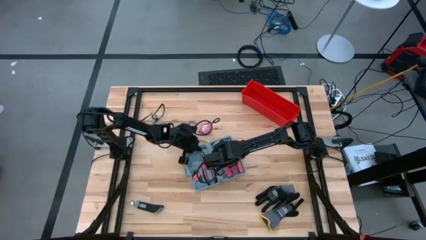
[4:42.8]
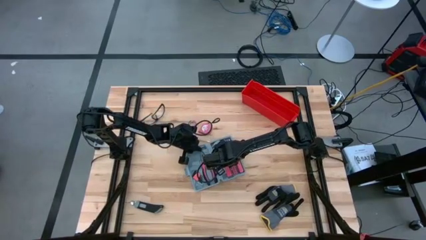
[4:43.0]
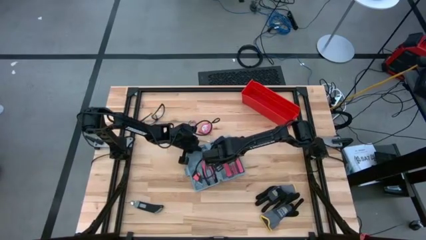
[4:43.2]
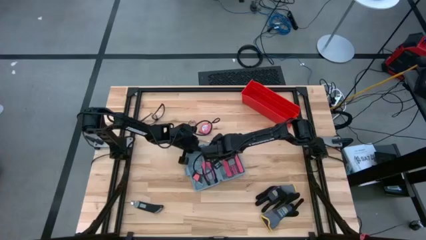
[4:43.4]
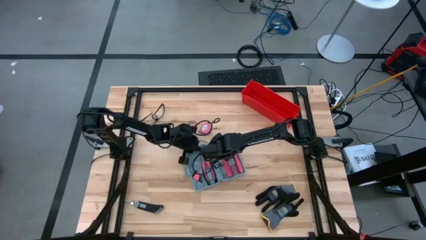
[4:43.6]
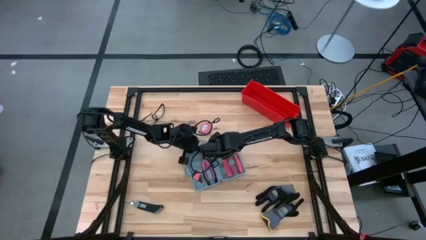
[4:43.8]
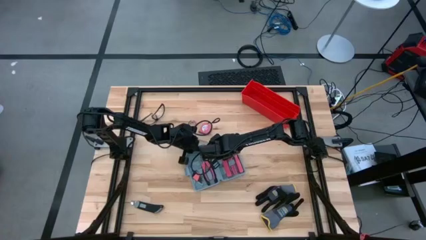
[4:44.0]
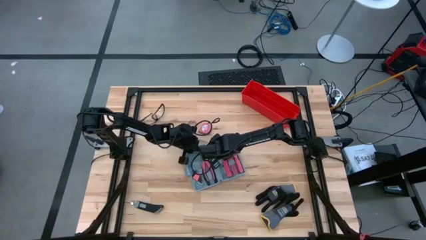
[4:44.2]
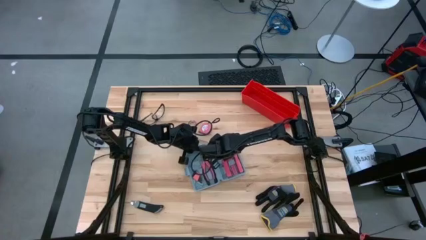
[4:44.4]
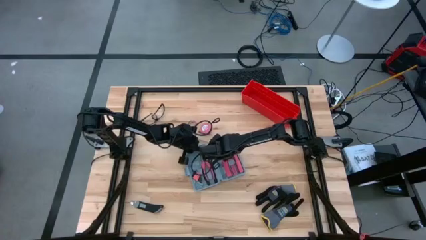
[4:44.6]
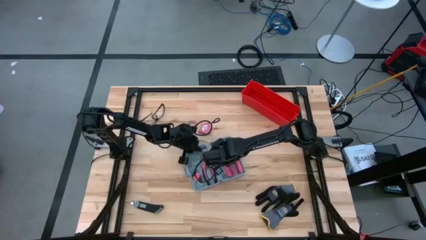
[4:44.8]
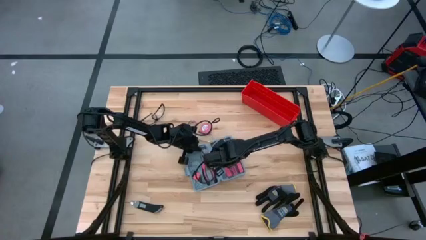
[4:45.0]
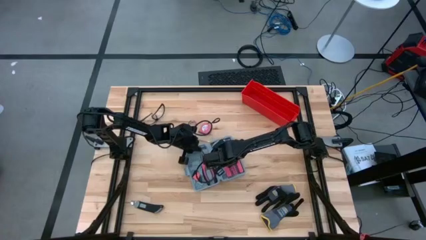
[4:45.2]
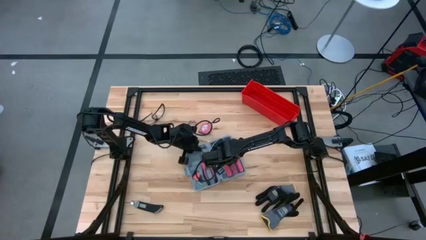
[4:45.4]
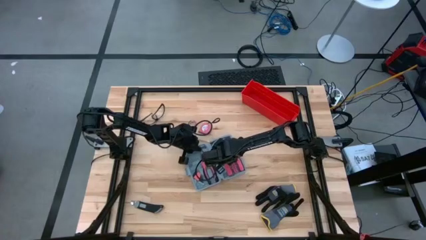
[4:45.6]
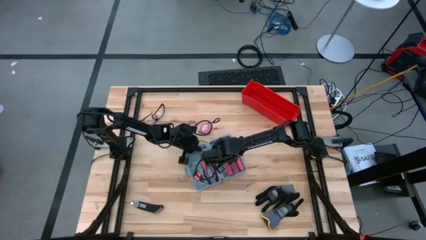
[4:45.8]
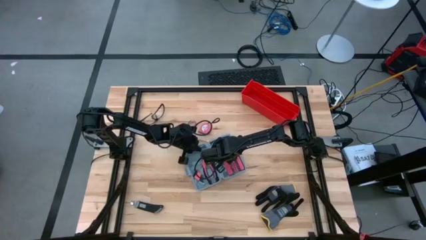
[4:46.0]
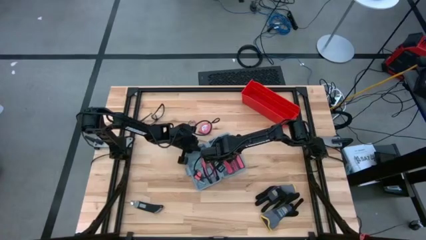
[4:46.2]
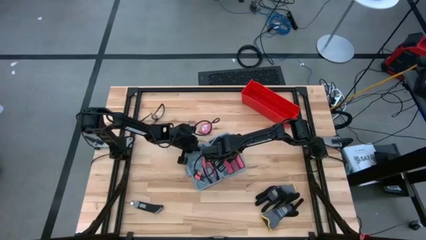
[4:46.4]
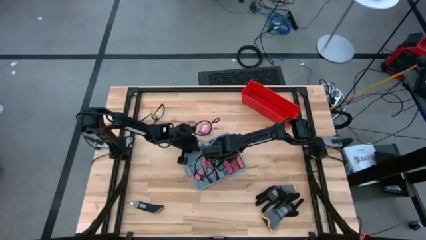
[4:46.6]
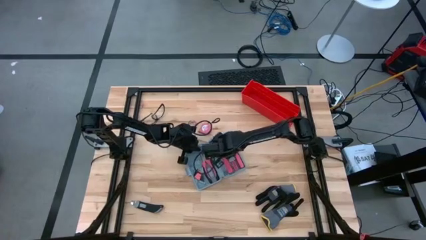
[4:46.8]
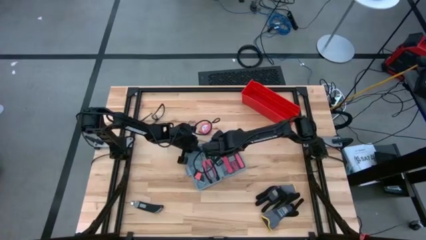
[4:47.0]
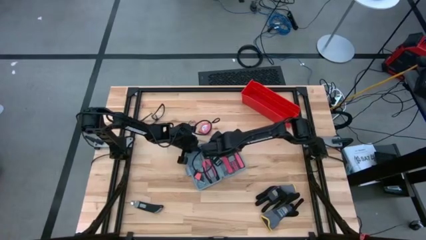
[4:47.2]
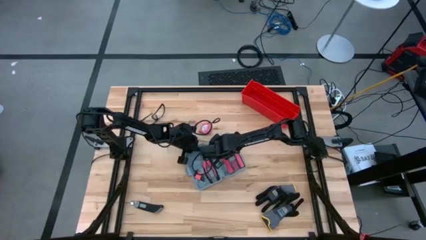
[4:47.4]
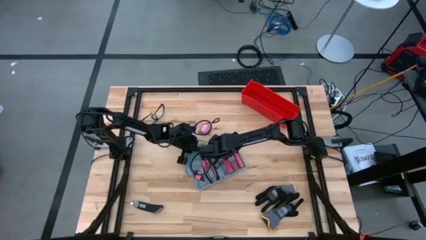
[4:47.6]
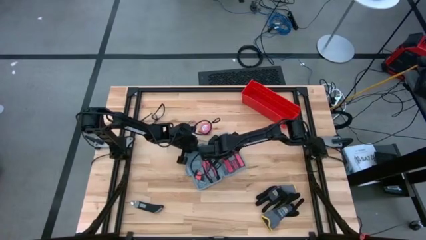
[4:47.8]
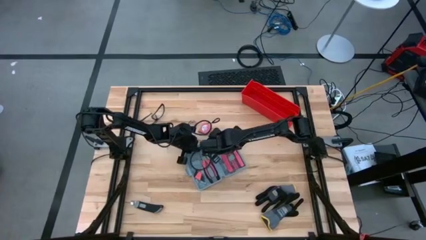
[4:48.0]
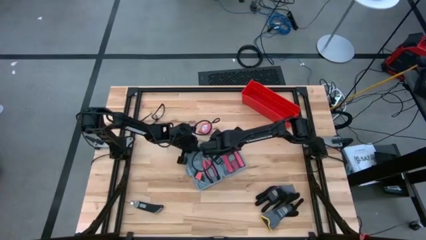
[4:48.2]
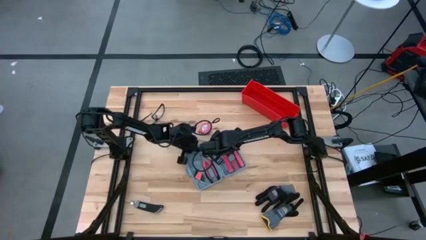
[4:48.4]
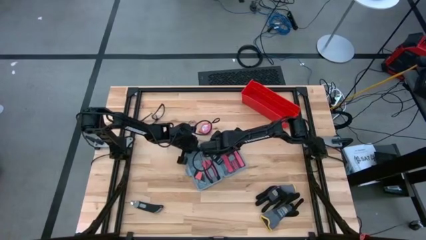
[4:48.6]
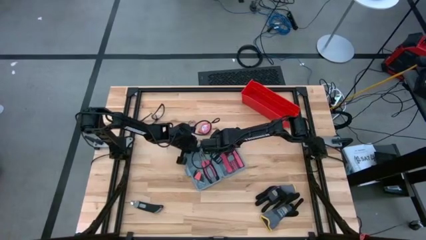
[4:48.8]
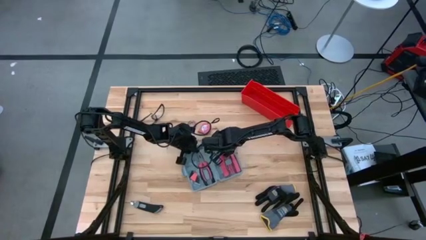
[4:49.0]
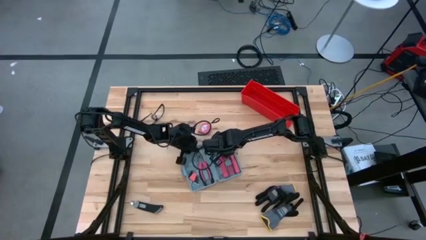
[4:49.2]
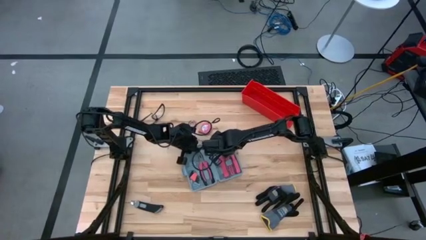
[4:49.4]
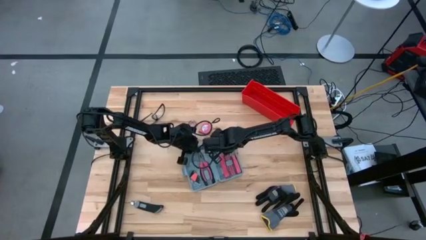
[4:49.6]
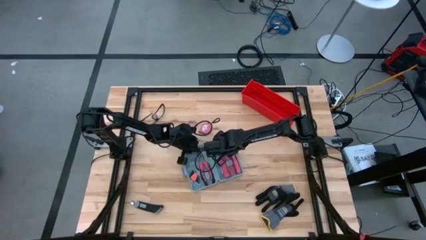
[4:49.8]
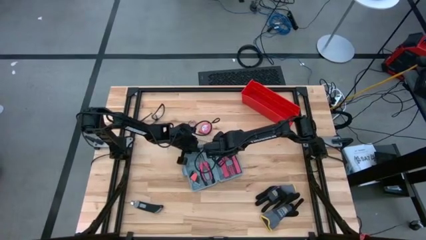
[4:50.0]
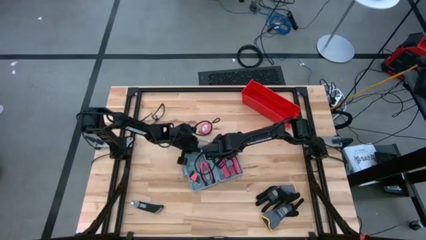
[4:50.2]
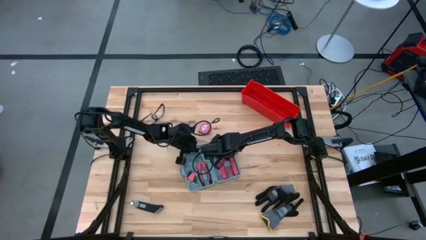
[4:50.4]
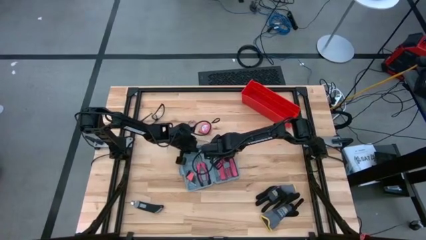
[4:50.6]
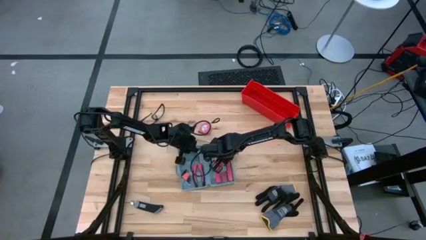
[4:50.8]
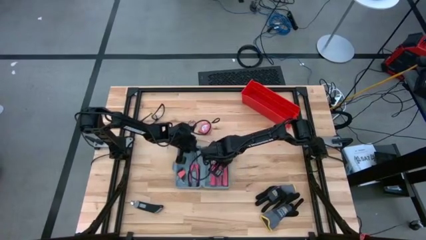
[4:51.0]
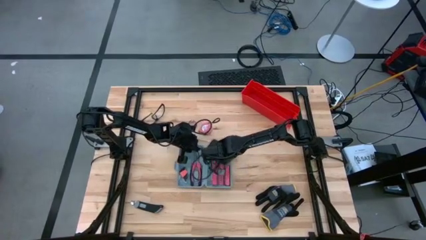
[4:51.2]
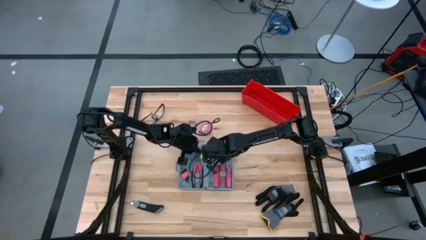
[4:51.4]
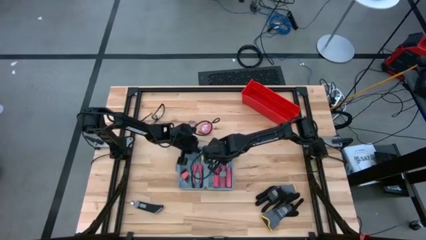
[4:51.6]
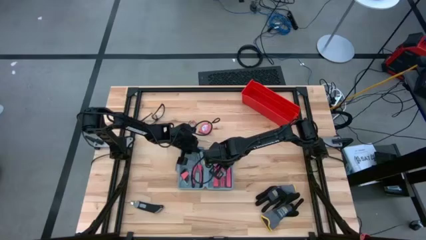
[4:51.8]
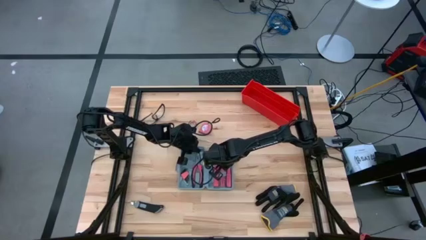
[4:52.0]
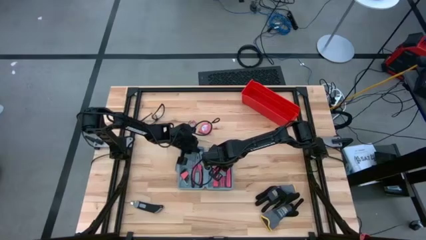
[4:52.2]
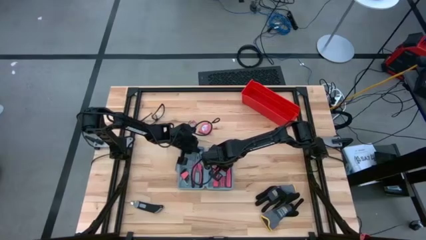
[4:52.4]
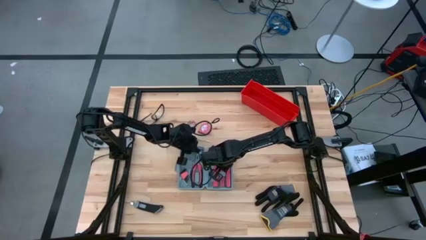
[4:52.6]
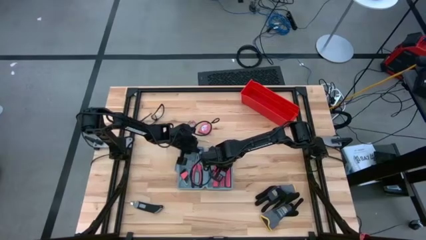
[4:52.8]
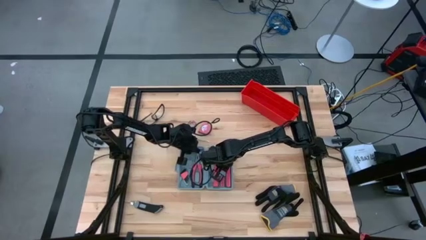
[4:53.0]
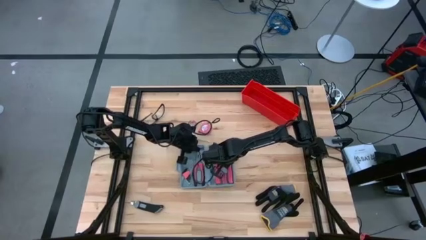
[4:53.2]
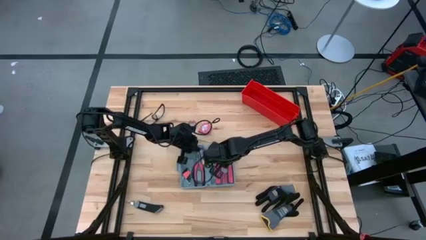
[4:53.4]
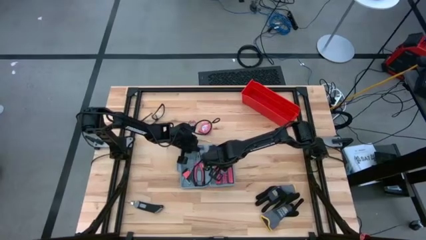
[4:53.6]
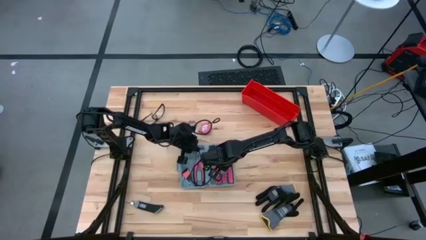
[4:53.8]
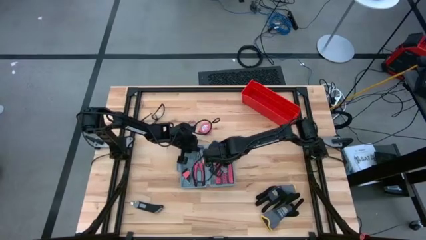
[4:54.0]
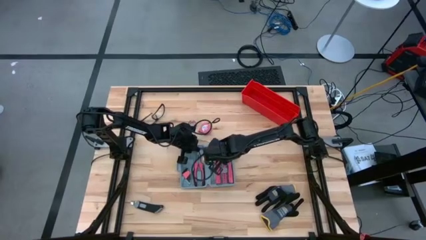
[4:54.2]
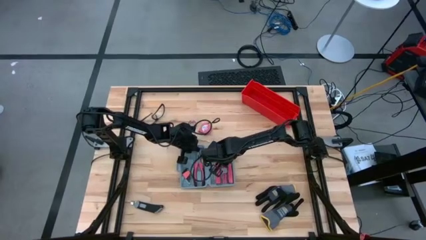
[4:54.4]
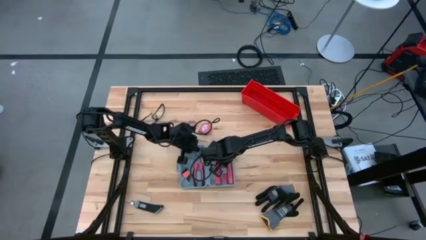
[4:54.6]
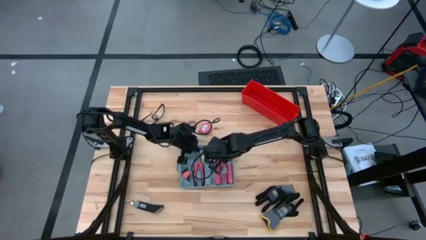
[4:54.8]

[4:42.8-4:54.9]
Task: prefit tool cases
Put the screwdriver bits into the toolbox

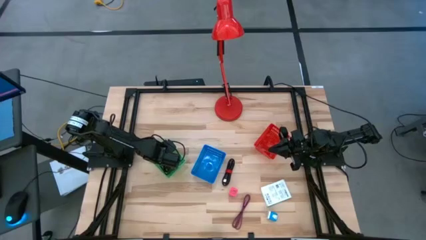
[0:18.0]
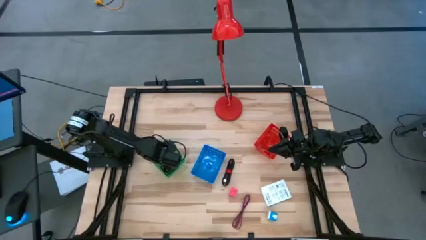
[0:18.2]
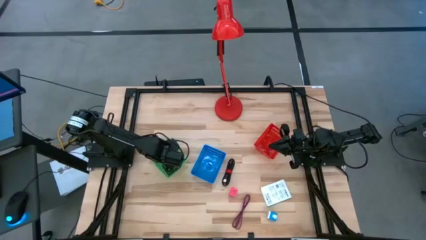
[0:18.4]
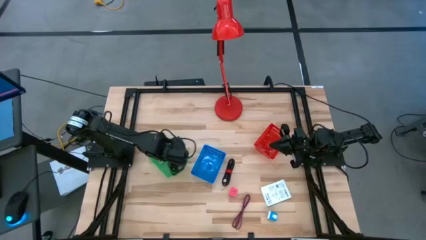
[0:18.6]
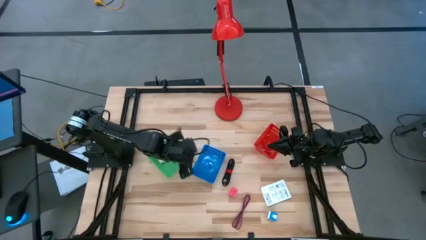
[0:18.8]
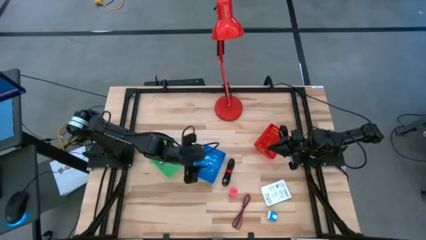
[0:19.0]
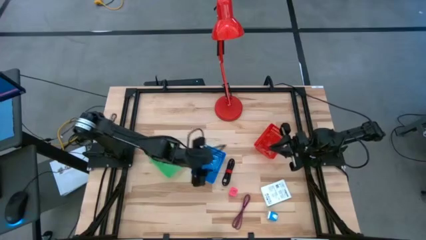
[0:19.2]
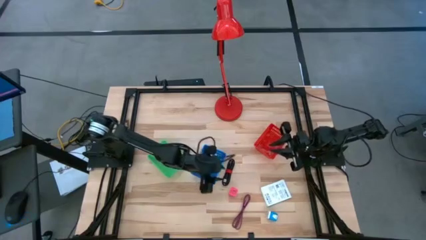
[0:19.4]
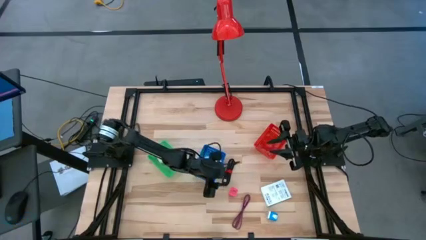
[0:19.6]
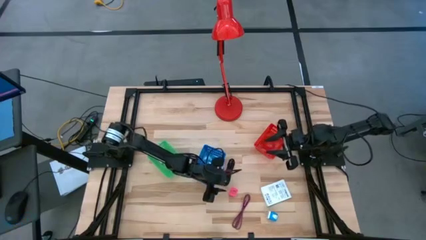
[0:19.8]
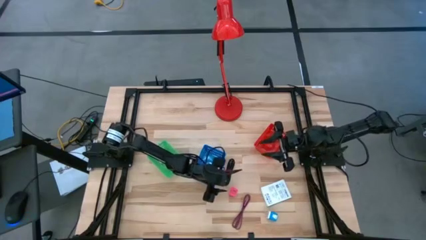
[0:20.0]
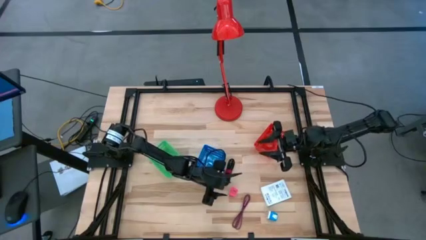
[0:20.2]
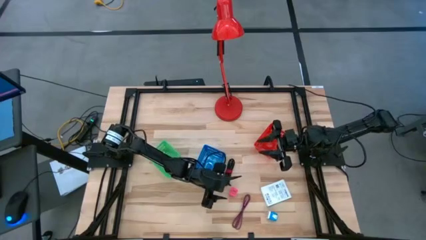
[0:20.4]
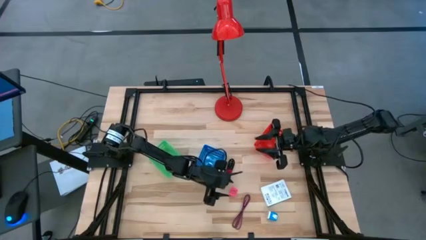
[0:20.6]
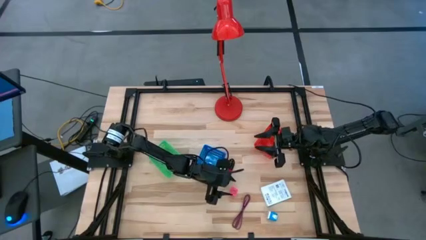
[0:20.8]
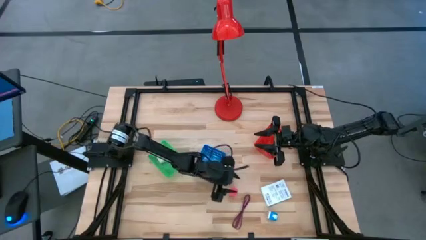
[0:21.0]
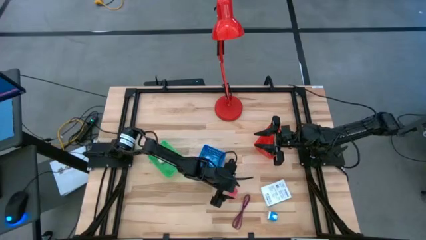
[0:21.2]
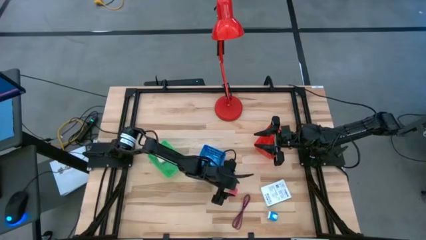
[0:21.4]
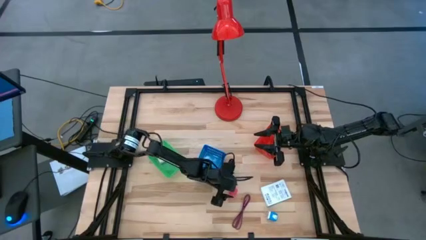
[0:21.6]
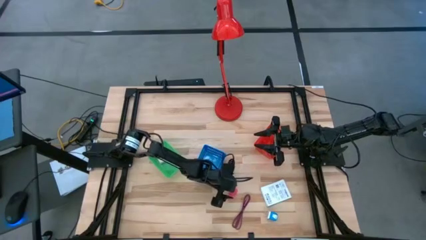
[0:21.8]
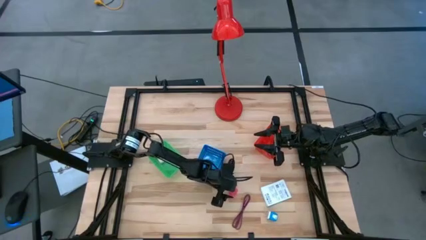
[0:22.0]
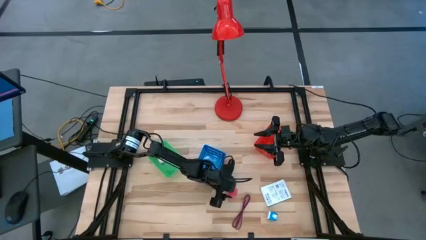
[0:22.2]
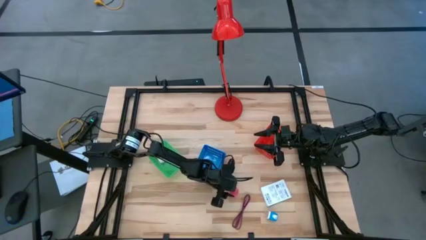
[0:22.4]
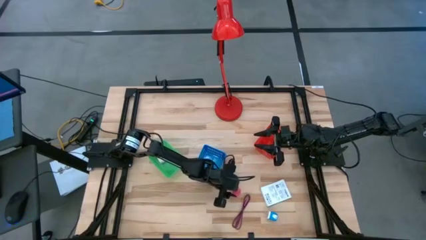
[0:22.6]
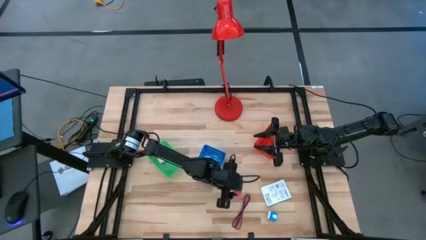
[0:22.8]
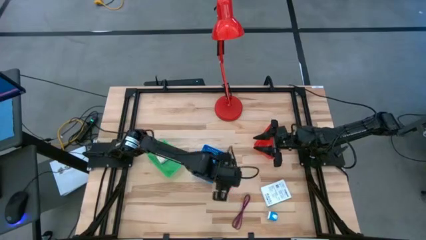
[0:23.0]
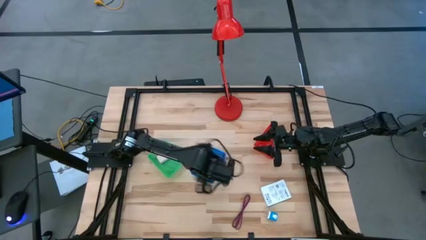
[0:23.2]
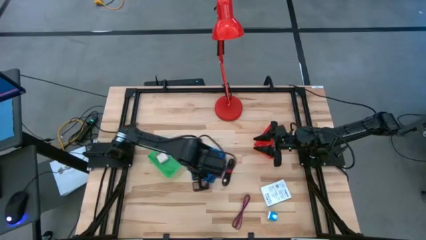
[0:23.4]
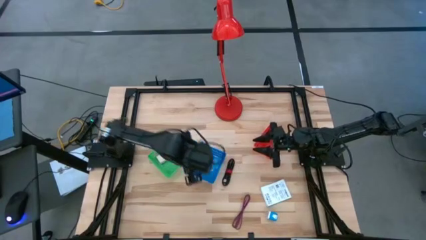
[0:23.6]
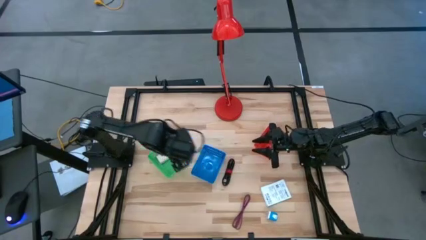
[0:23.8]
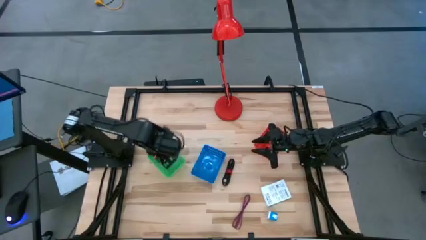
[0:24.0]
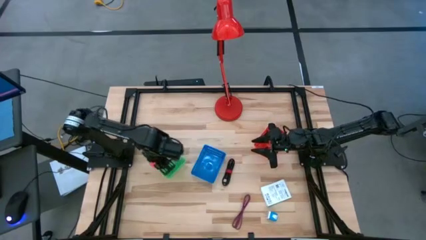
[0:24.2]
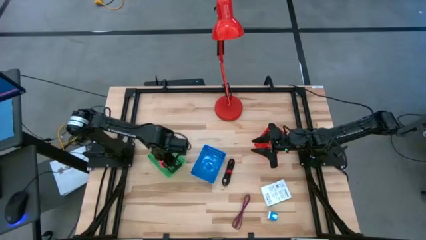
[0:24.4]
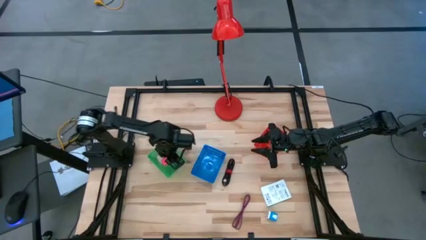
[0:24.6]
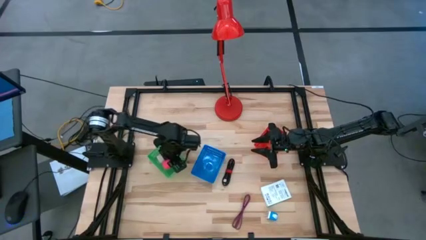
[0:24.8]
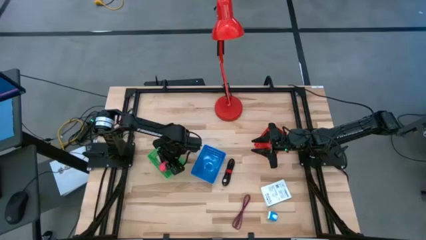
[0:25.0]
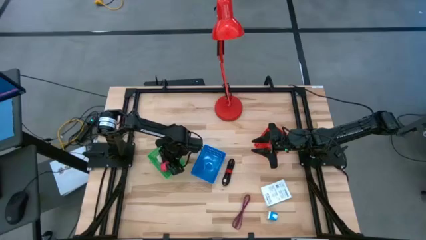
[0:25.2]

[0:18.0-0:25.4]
Task: Pick and place items into bin
Put the pink charger adapter into the green basket
